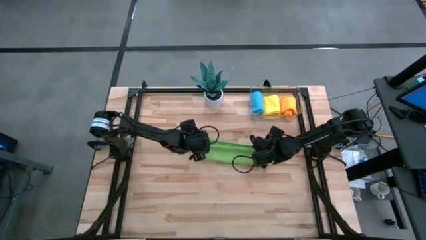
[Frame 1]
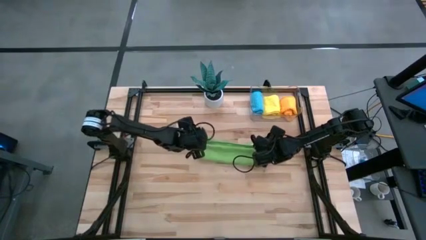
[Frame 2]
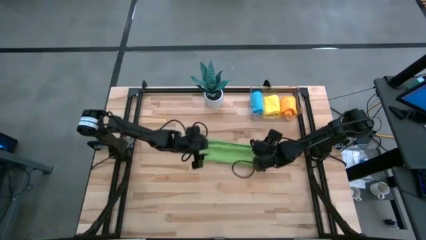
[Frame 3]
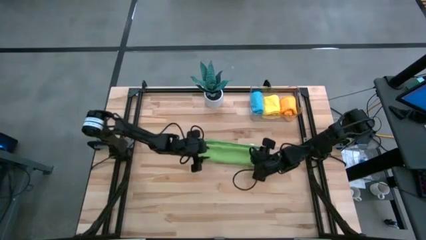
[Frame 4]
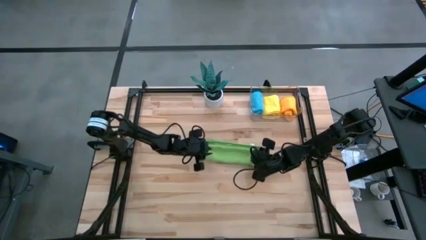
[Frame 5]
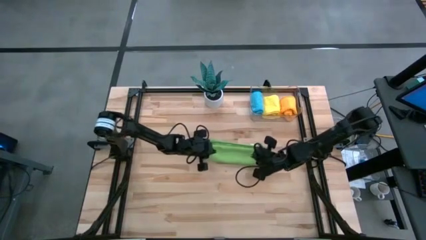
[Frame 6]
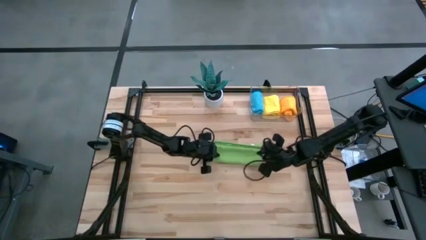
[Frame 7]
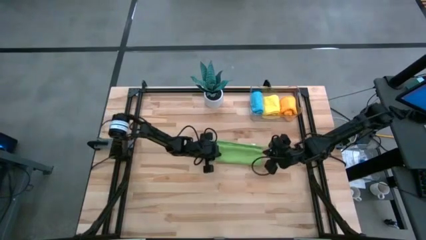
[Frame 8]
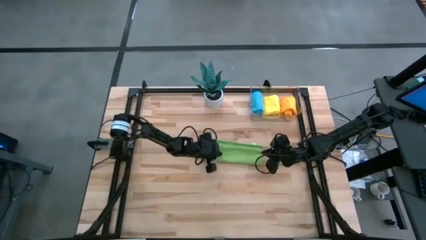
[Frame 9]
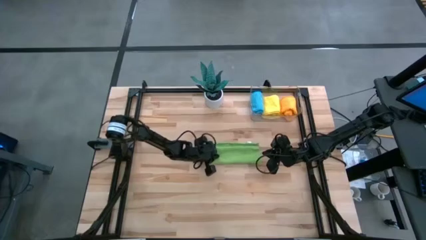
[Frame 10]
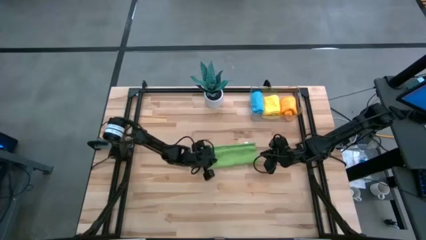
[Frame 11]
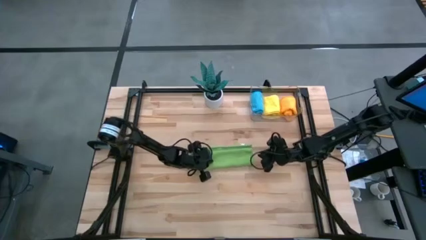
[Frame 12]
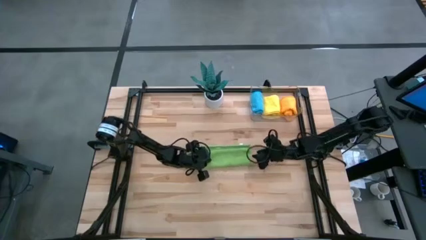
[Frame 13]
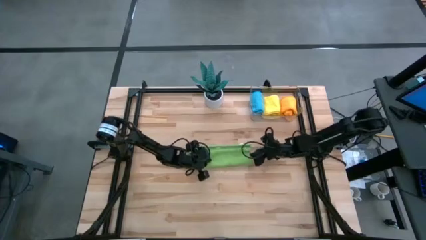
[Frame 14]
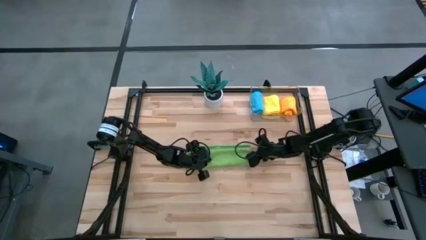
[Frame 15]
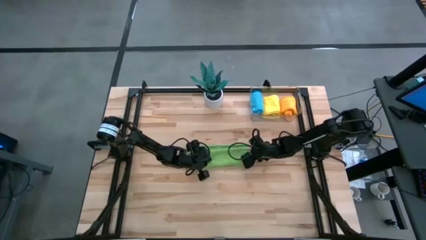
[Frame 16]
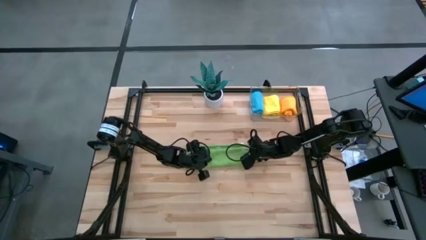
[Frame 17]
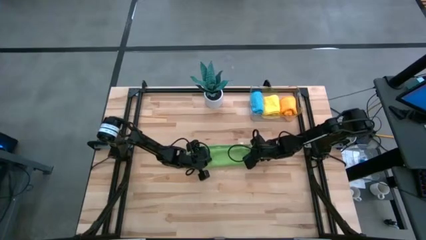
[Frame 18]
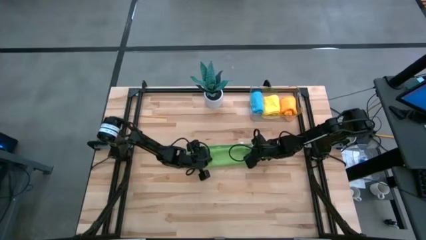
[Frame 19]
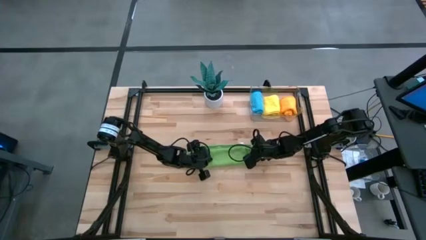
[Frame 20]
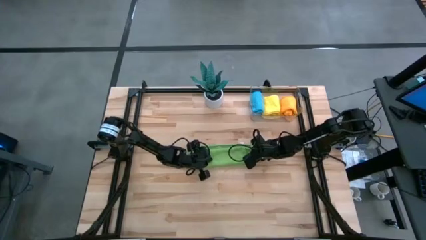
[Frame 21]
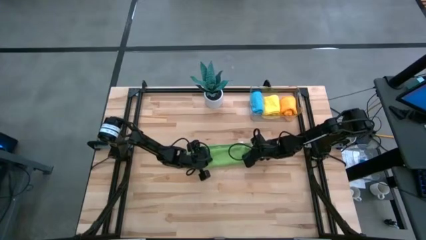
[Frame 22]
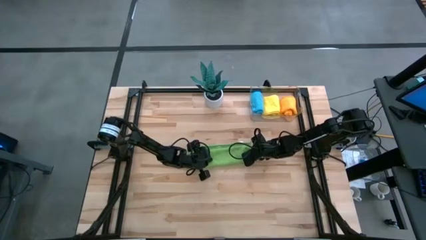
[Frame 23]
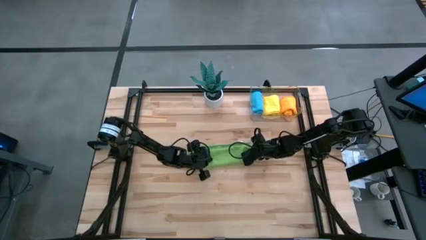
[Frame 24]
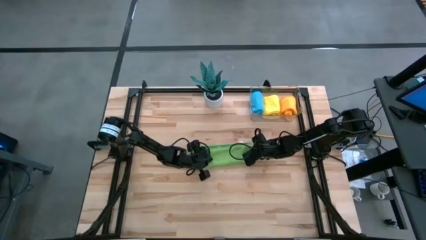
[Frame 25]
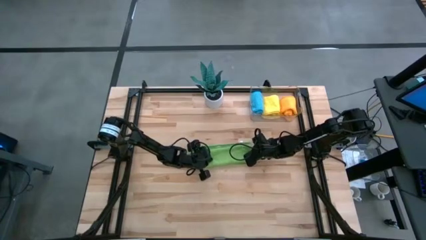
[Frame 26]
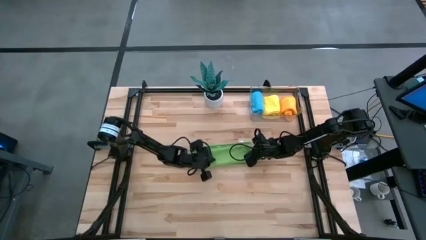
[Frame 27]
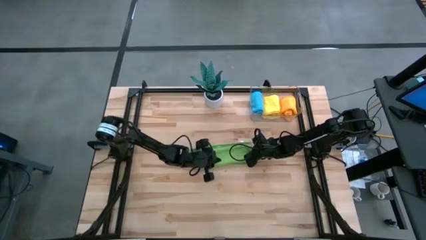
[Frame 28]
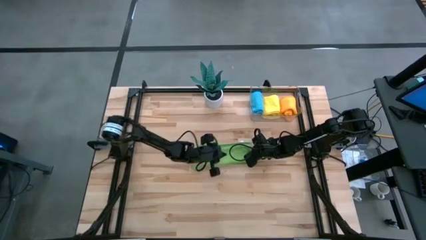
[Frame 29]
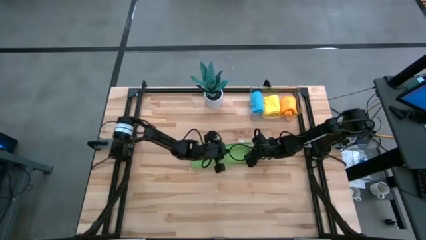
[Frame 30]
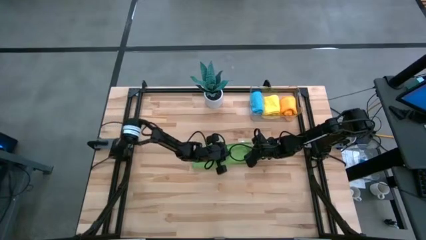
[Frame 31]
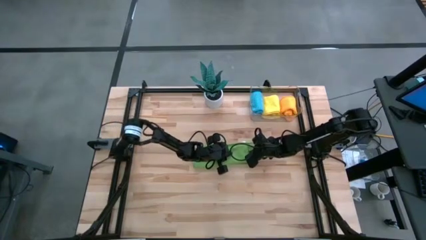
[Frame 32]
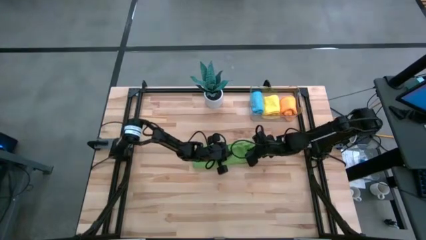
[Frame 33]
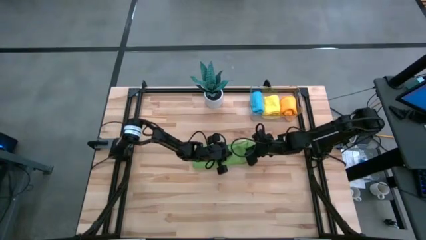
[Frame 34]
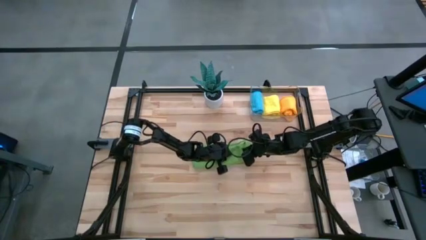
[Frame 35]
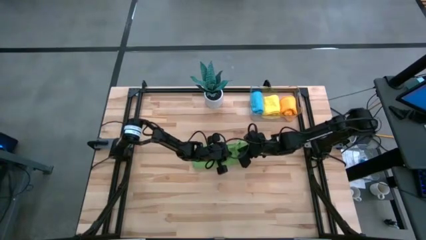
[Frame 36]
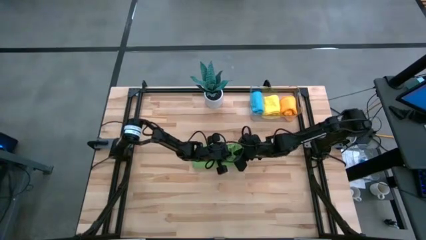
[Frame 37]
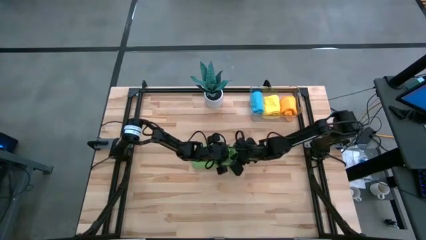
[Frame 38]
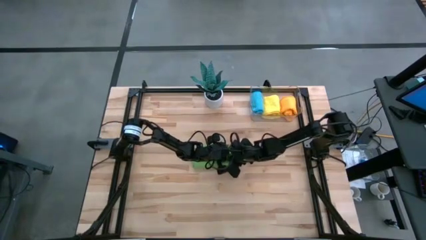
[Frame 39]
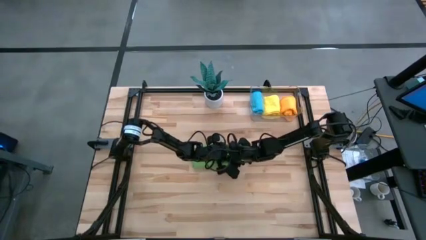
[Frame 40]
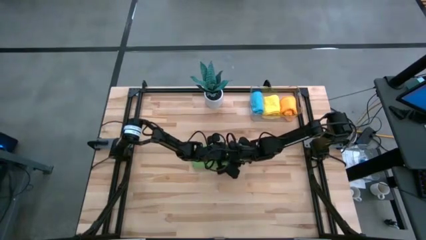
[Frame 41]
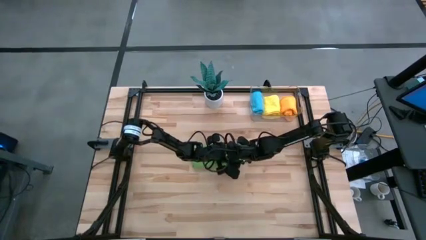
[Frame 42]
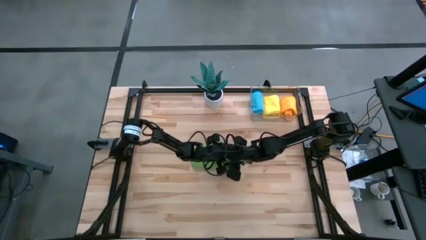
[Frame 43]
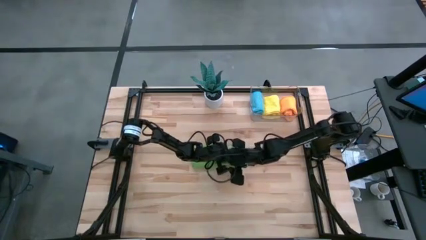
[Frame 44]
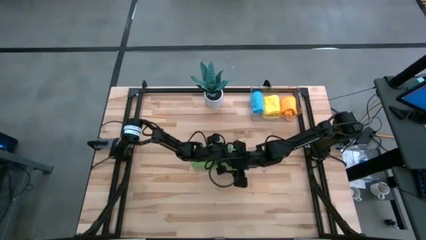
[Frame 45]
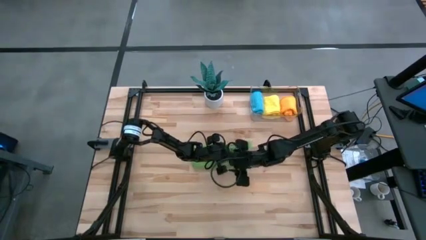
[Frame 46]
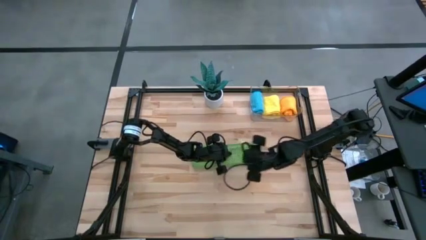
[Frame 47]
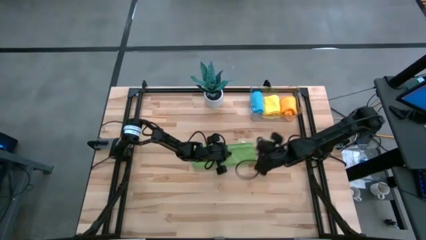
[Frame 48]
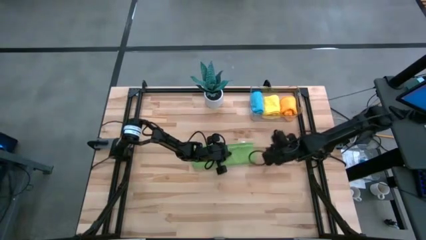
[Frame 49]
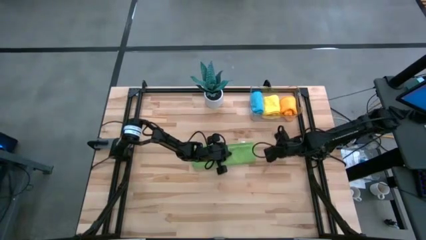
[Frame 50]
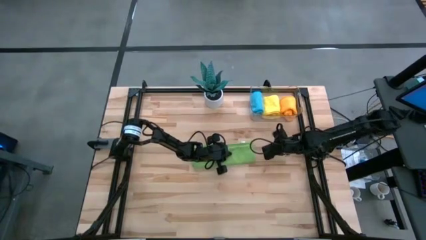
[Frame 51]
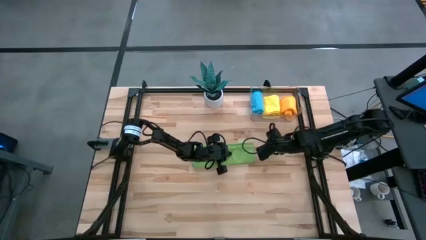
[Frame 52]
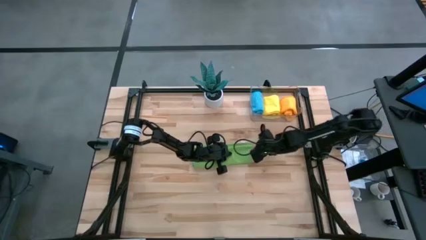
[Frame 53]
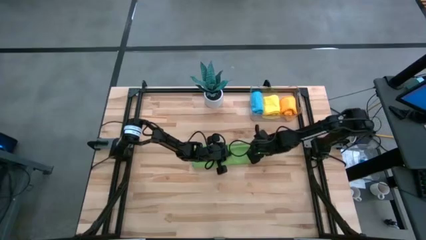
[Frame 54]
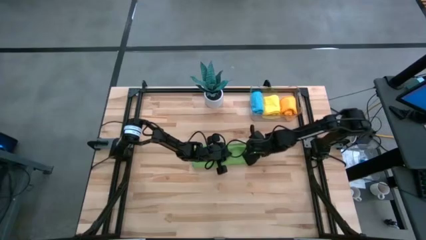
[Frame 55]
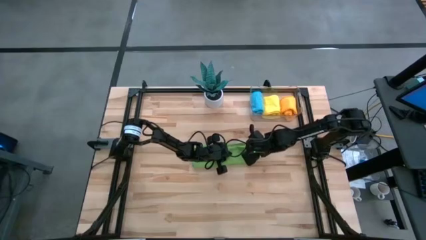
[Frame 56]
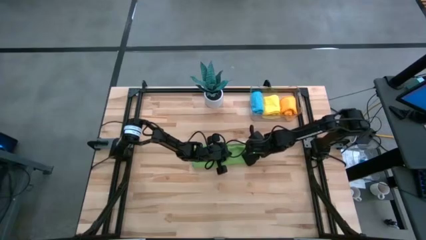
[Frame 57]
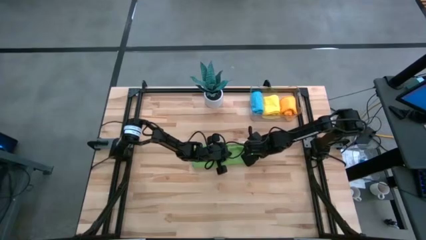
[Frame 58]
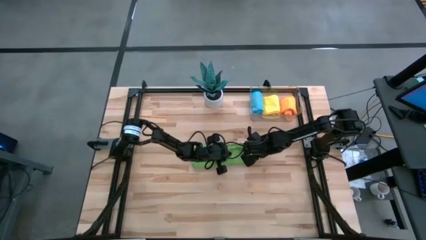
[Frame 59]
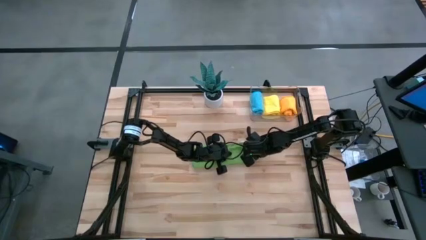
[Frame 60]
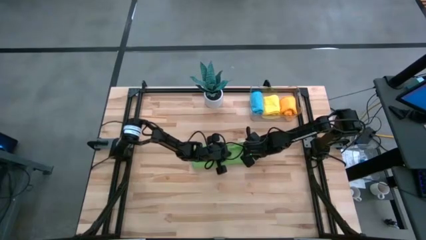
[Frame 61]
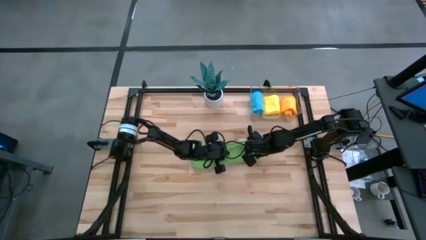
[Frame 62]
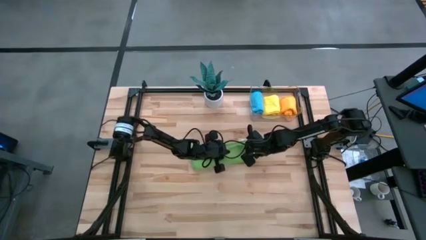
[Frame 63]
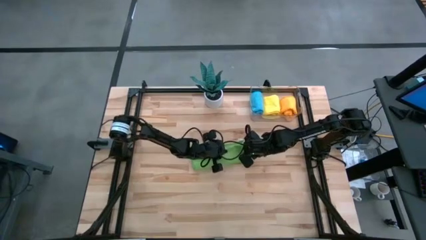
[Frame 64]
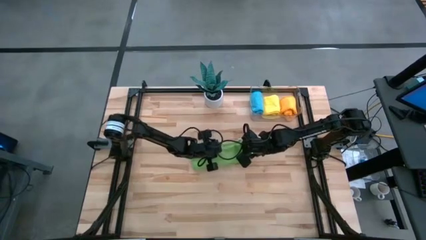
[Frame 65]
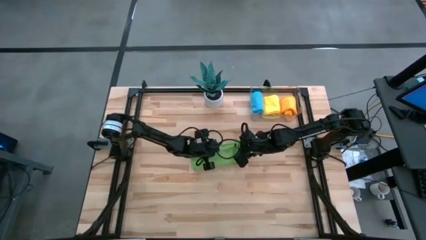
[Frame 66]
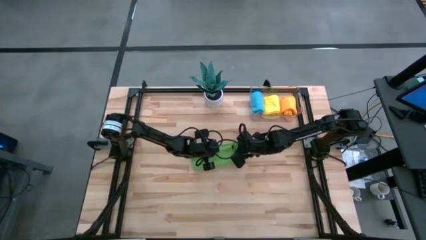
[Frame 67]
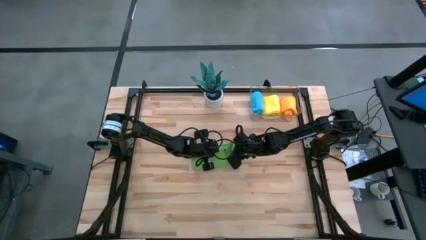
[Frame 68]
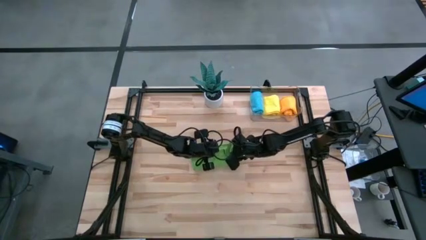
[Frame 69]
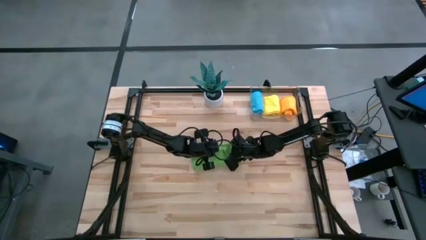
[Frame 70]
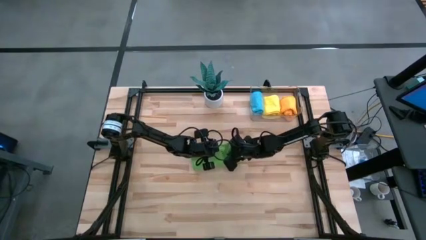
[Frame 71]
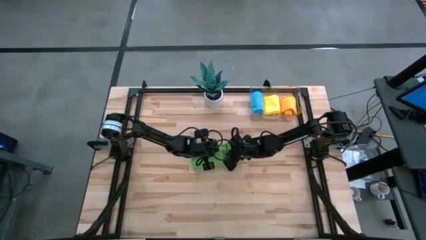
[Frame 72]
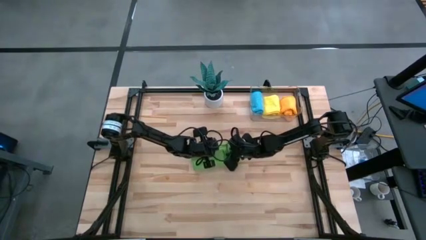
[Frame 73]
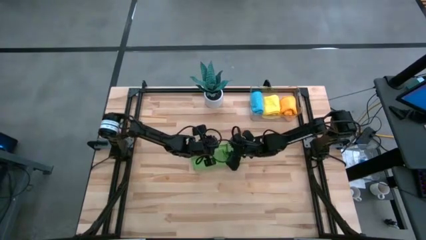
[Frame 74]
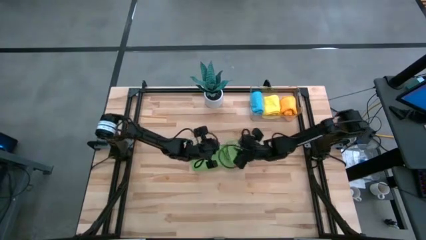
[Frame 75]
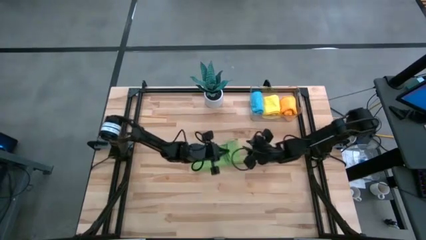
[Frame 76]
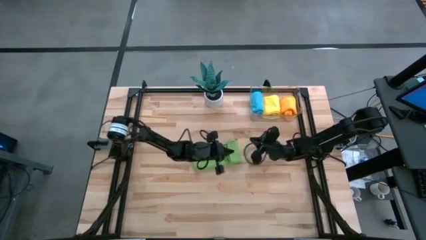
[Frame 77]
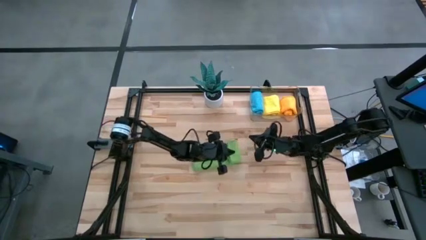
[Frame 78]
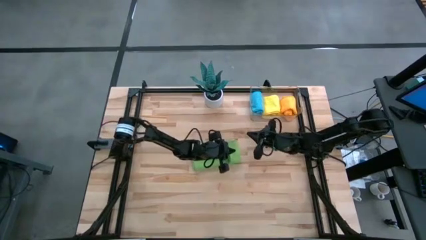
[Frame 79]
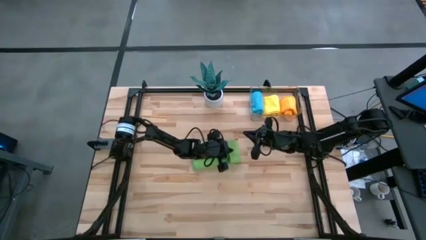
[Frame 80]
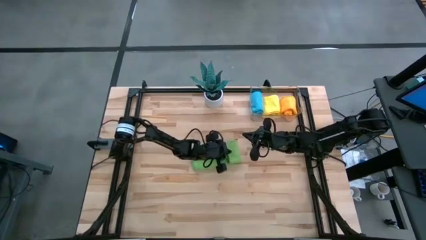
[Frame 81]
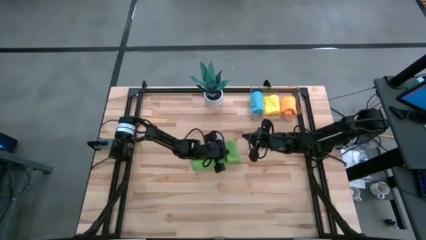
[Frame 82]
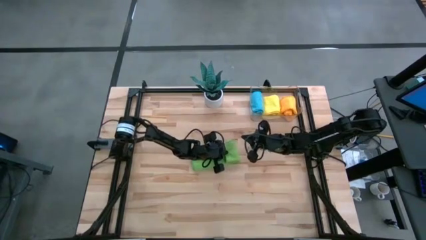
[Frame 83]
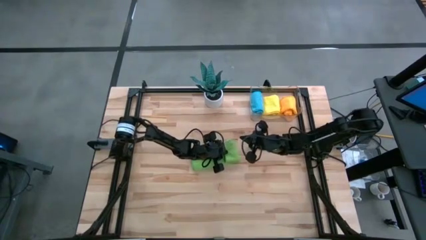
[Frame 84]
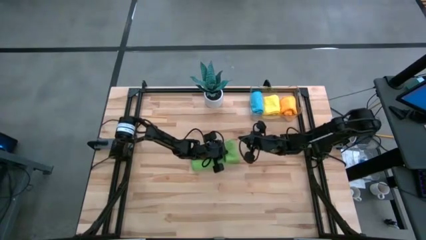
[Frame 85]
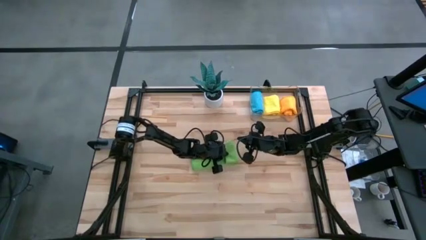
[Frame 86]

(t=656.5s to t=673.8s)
Task: Roll microfiber towels into tight, uniform cylinder then place into a basket
Roll the green microfiber cloth
